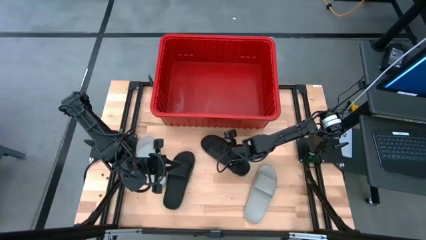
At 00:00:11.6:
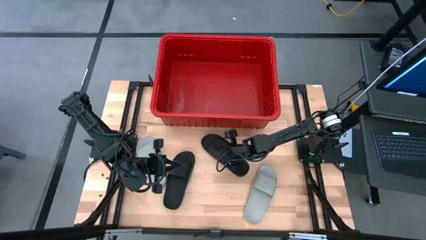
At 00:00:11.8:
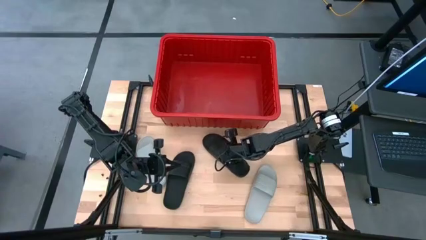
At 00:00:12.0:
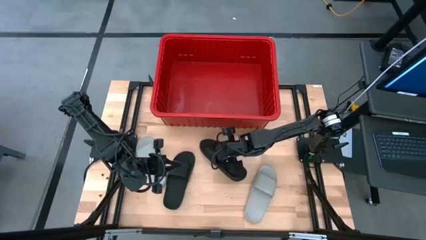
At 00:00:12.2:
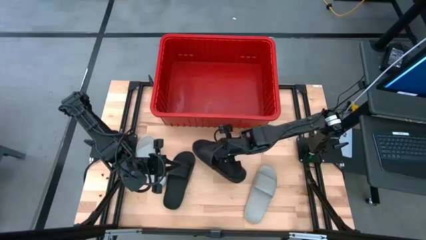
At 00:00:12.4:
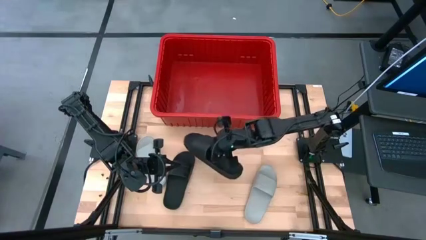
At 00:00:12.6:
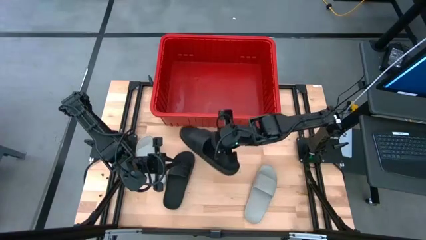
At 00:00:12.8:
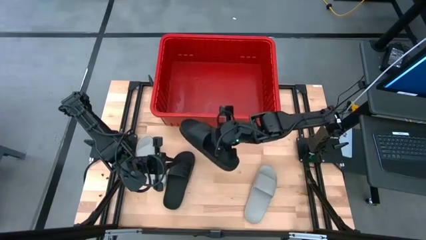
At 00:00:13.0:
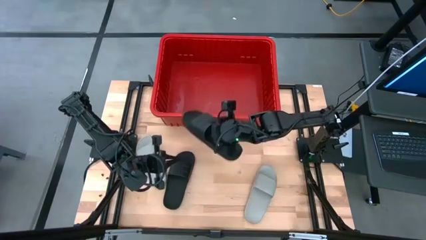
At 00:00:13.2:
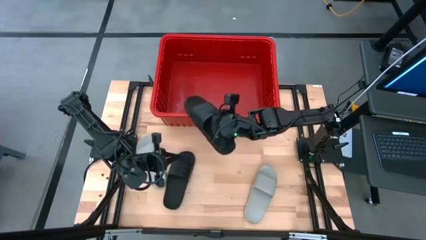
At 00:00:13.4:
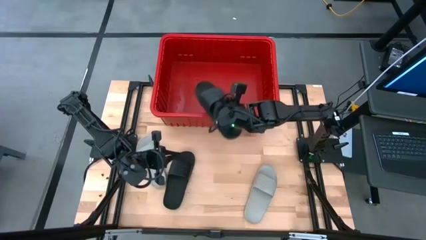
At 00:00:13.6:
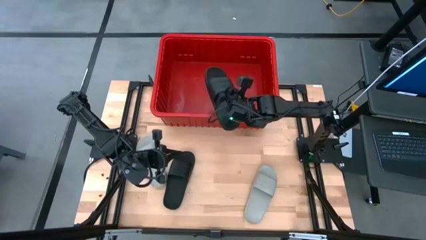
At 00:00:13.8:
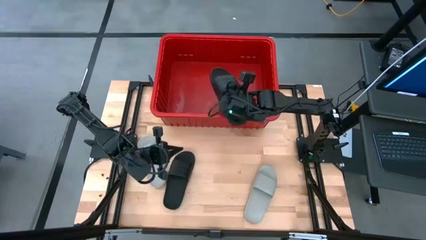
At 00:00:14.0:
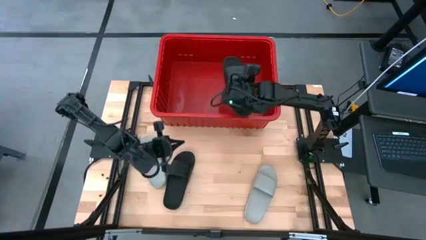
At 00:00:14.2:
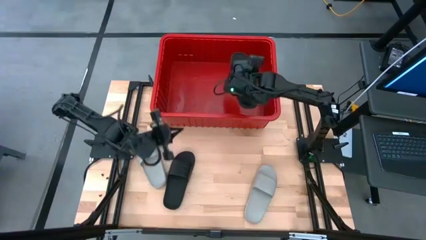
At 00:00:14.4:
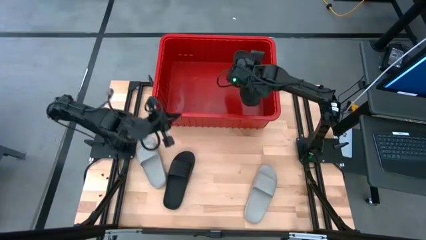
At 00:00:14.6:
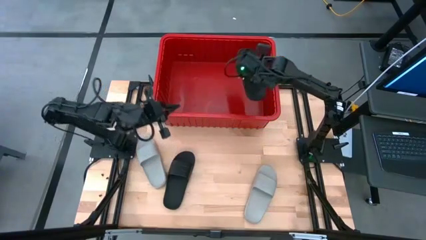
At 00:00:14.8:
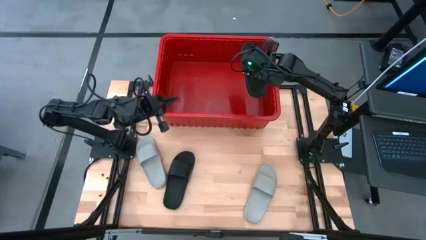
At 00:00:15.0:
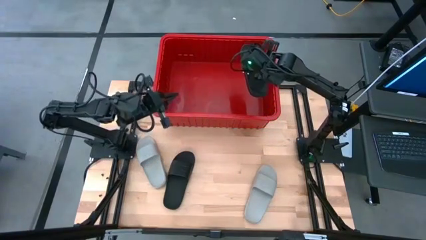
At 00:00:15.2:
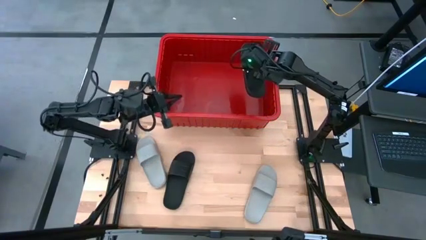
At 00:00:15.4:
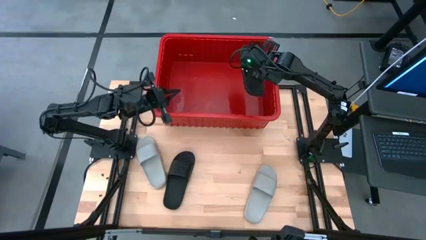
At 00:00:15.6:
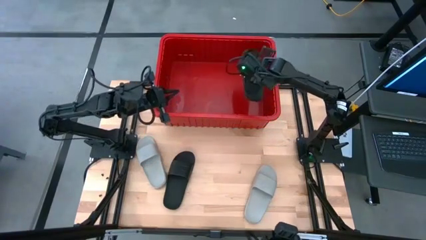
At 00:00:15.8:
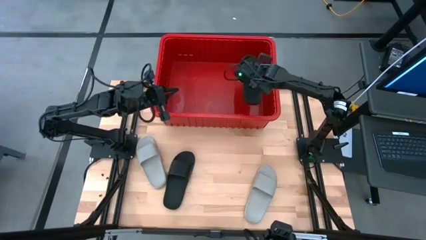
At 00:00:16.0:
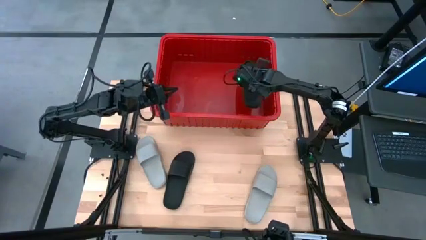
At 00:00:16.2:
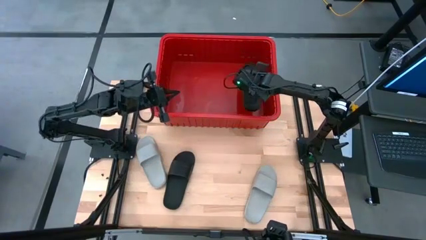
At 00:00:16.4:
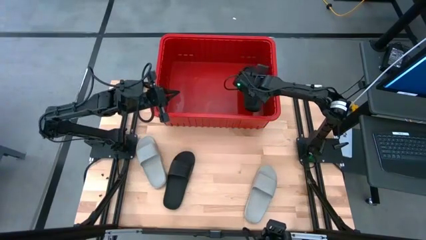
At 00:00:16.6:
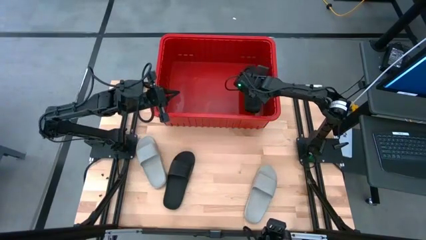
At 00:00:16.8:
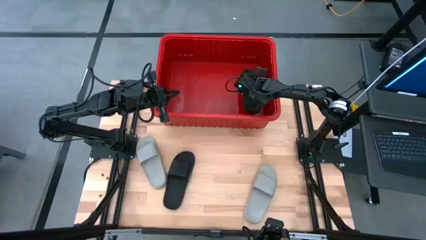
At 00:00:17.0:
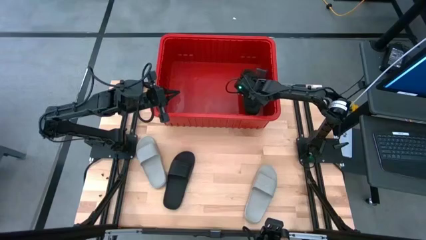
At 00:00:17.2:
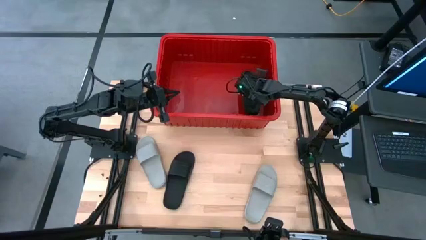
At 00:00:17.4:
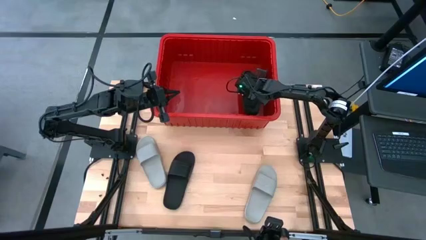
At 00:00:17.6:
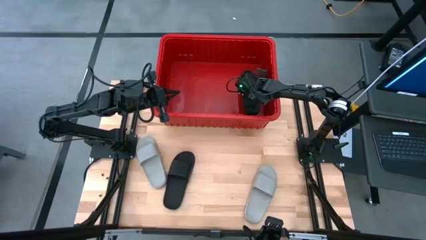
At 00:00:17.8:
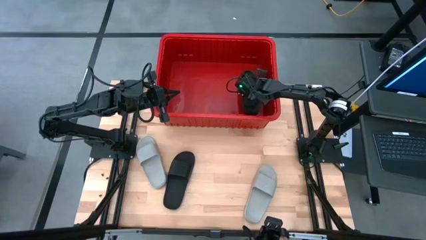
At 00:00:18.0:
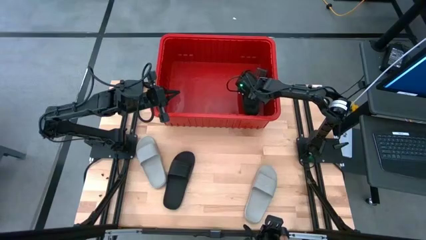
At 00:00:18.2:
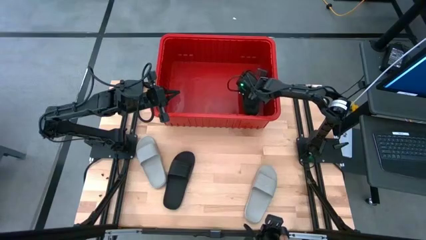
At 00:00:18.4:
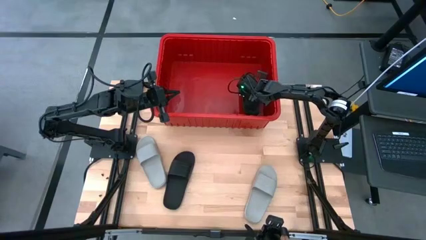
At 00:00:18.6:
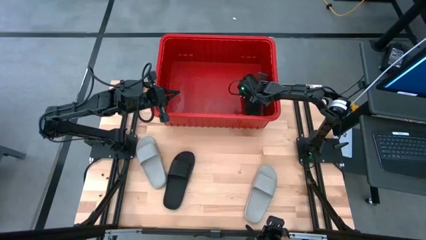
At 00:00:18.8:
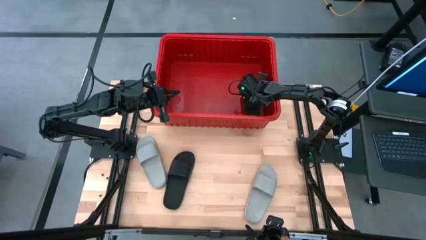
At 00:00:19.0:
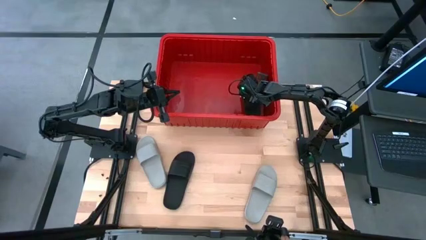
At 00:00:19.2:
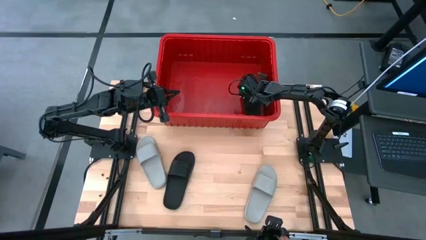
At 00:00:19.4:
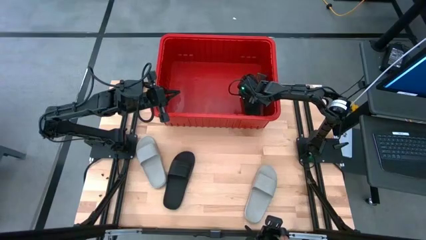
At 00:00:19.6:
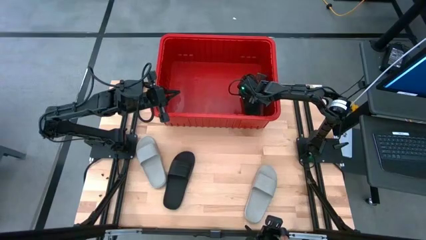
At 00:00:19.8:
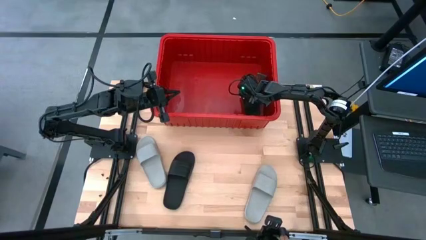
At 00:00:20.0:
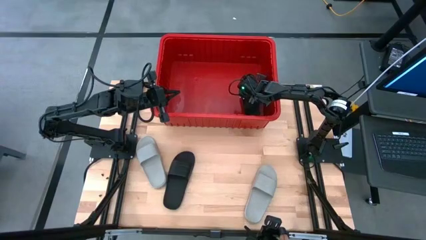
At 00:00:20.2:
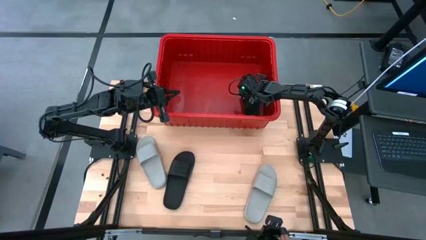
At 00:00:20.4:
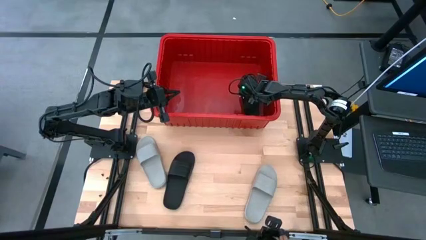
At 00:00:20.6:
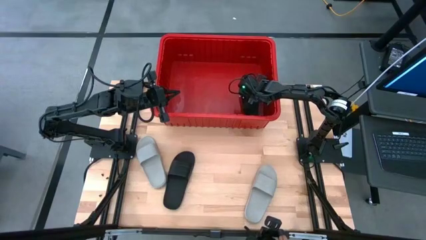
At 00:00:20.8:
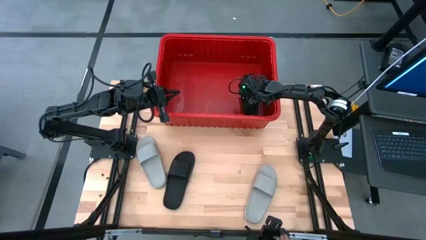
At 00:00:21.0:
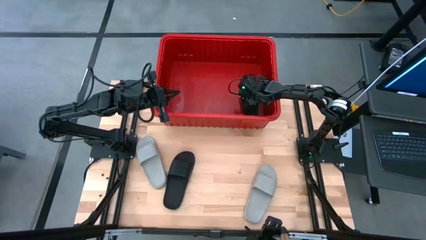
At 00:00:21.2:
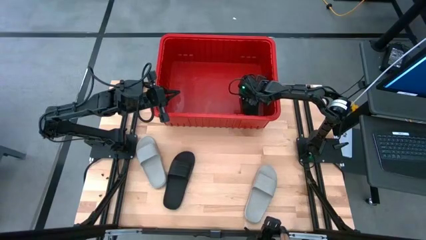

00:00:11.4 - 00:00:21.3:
Task: Pick and place slides into bin
Put the right black slide into the red bin

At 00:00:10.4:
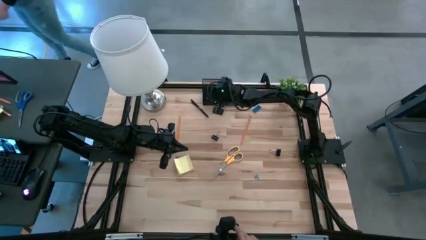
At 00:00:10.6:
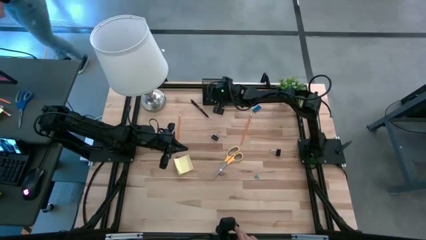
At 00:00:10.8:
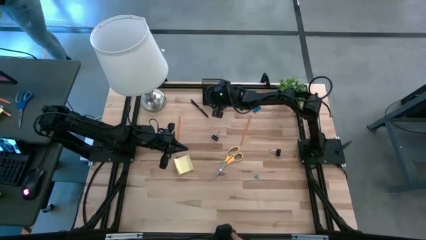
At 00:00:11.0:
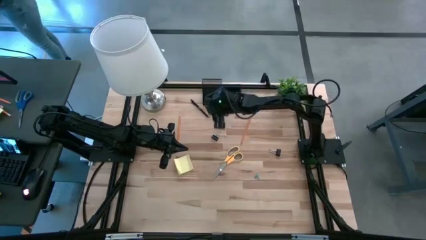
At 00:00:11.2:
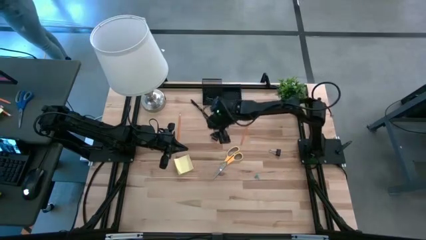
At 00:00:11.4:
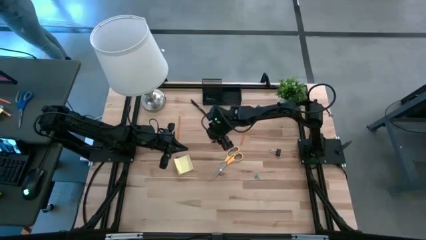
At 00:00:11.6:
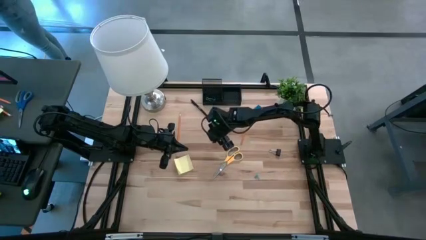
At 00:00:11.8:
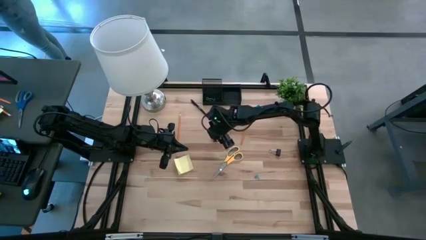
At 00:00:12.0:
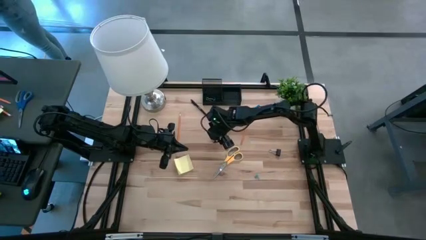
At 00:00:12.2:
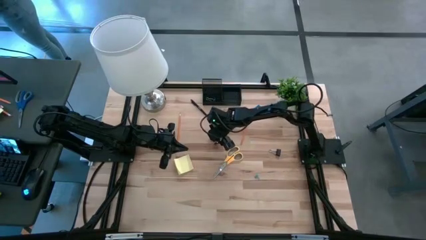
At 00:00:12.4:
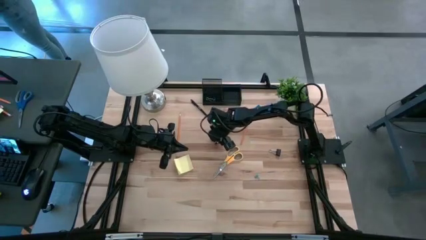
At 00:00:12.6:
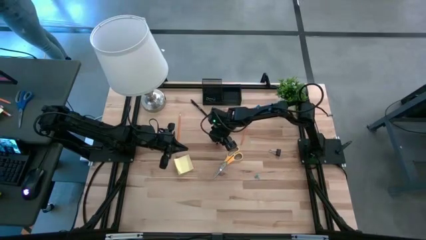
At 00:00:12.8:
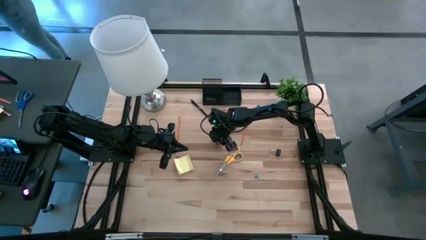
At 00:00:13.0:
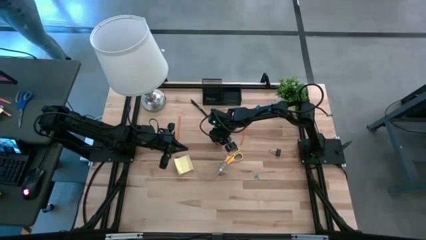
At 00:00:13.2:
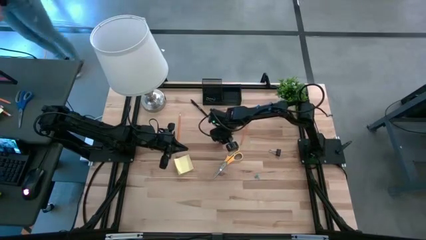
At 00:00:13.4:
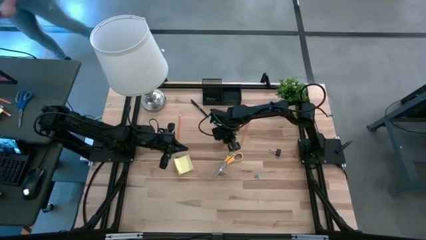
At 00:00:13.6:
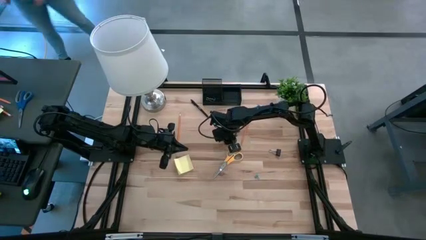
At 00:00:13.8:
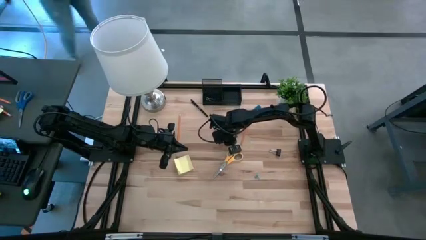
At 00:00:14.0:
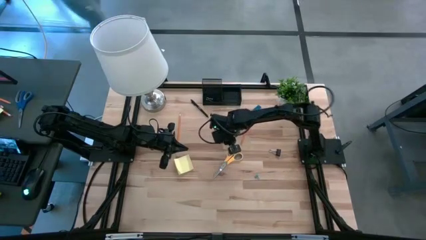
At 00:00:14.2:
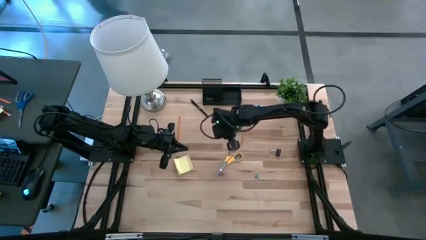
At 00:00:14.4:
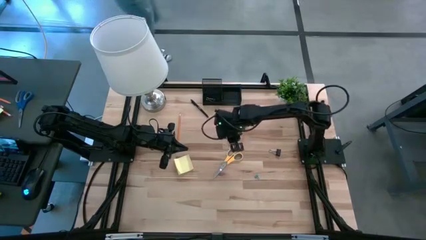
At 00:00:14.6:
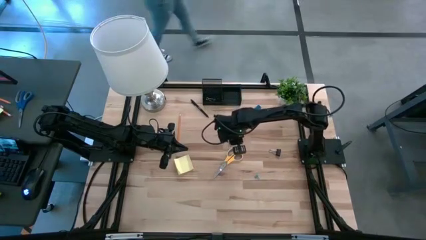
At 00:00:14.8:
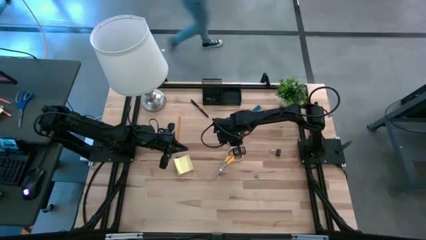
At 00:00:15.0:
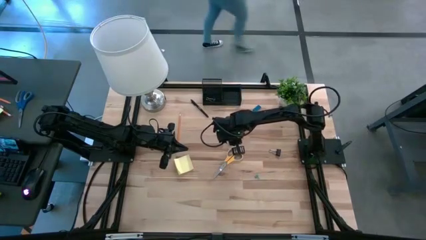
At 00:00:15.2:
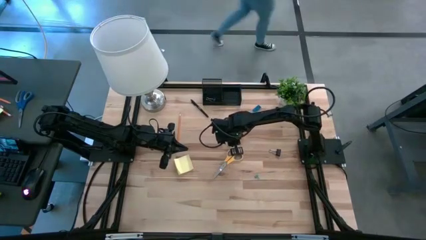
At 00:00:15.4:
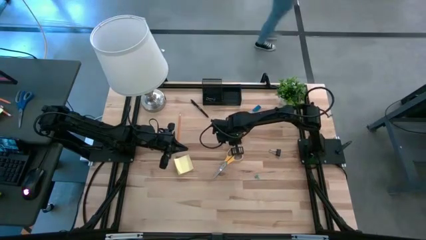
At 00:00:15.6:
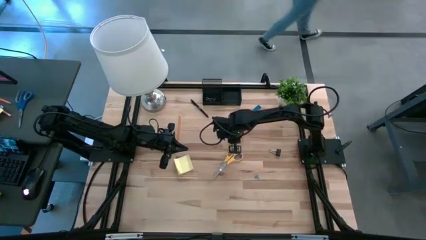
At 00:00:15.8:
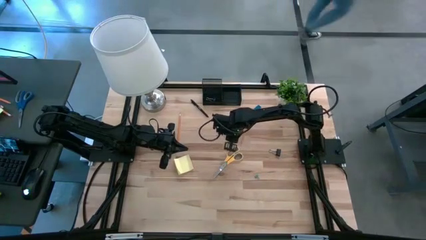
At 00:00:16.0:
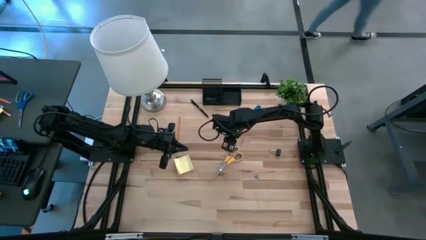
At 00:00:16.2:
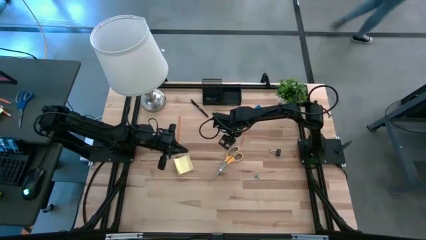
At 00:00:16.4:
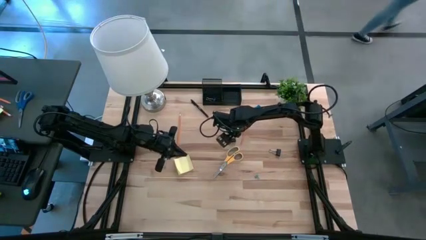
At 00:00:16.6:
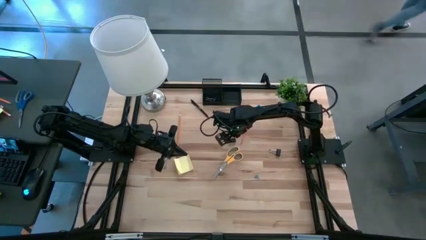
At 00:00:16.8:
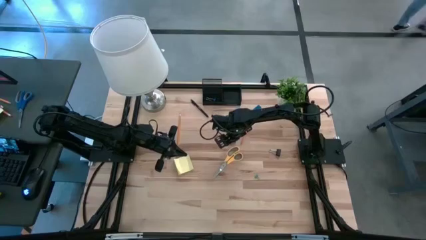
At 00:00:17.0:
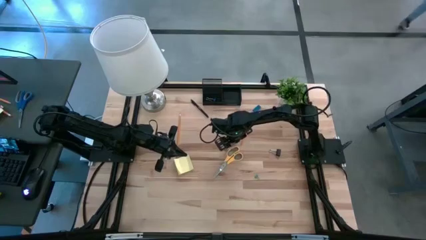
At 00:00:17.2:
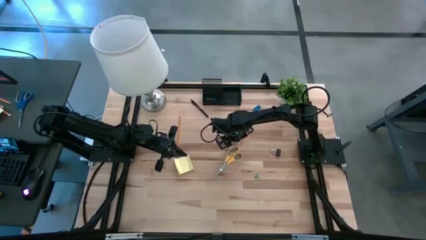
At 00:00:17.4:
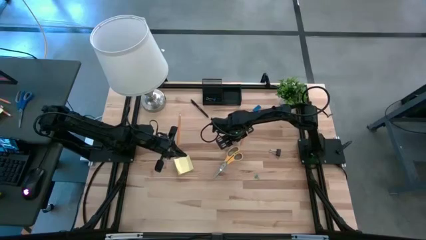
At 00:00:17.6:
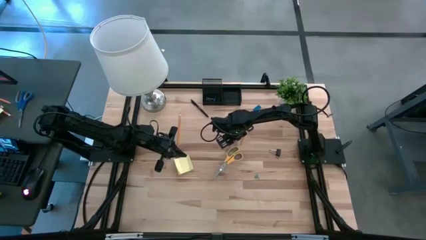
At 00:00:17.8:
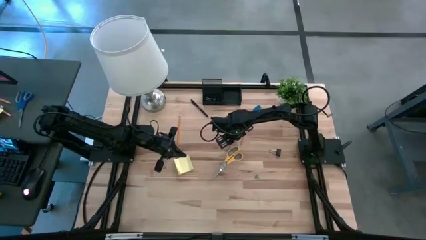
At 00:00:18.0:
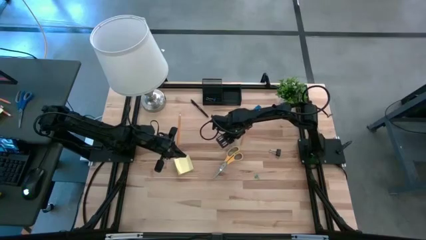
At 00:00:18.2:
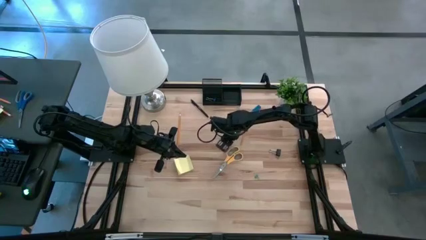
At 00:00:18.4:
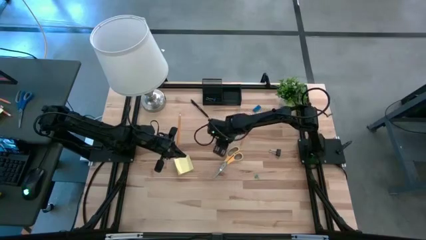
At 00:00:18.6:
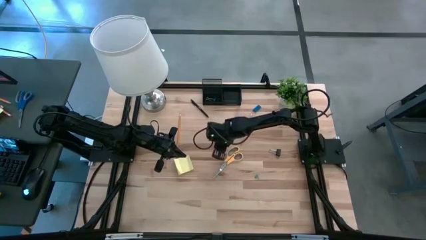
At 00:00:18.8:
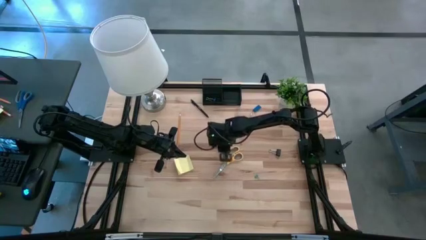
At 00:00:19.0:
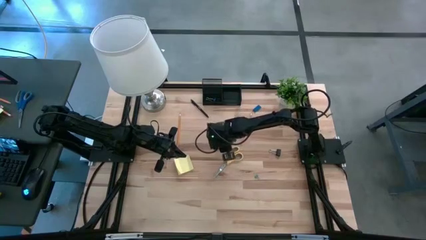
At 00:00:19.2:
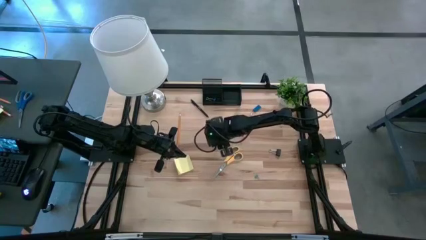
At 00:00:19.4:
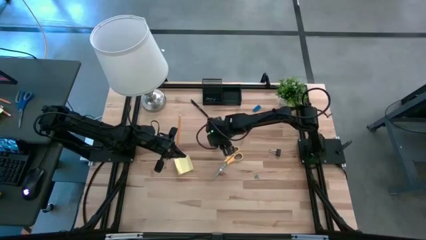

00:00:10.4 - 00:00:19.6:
Task: Pick and place office supplies into organizer
Put the left black binder clip into the desk organizer
